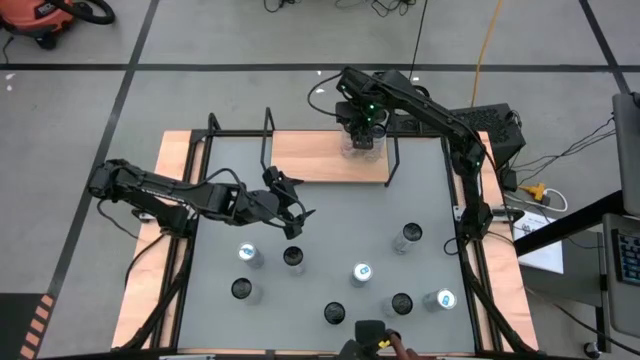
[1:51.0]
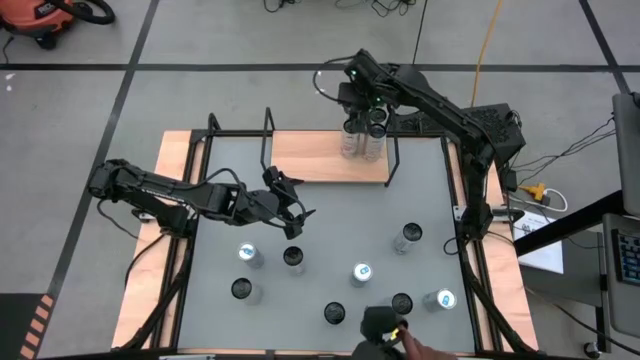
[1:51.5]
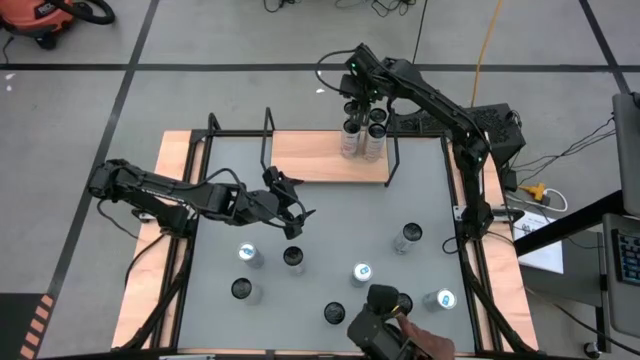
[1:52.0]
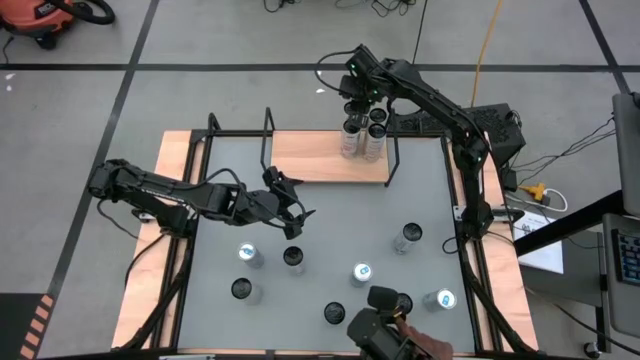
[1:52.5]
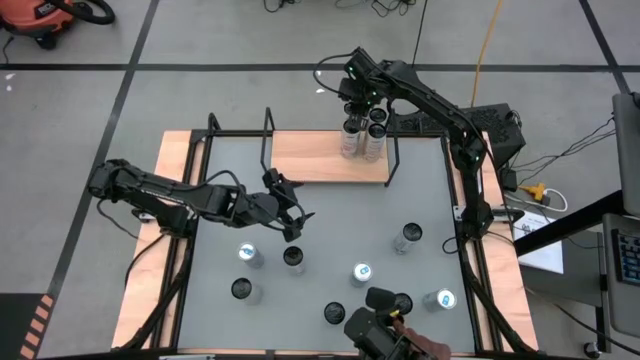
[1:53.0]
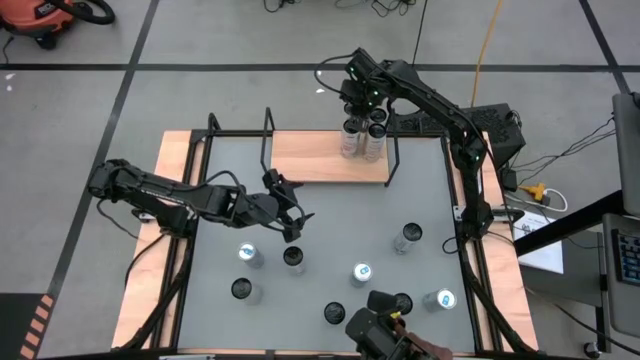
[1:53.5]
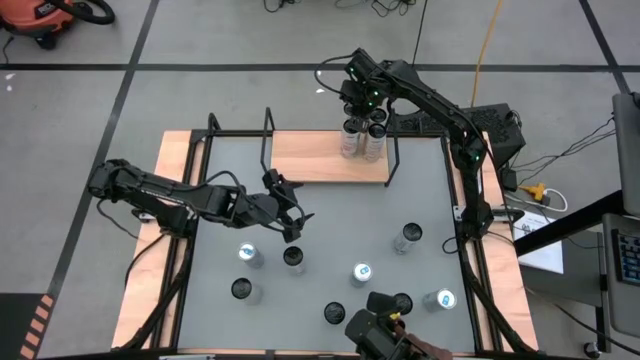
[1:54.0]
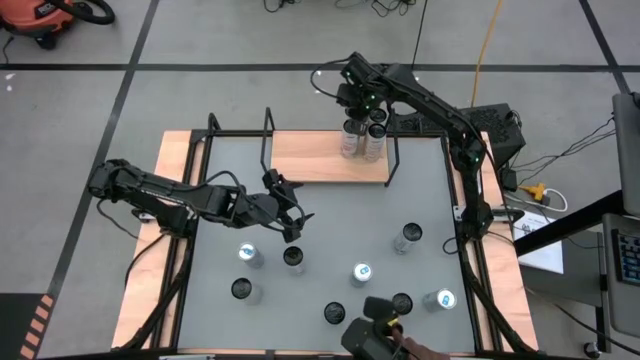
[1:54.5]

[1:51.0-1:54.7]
Task: Place canned beverage on shelf
Adjust the white pink soda can on the shelf

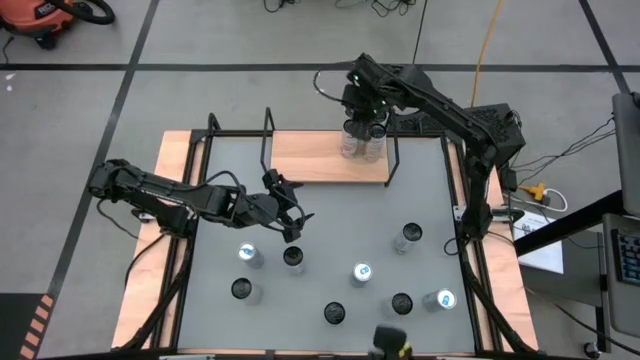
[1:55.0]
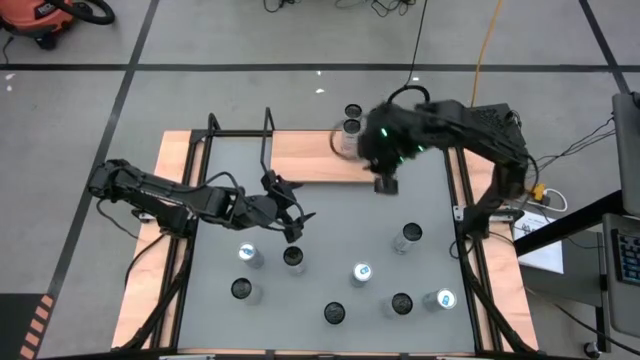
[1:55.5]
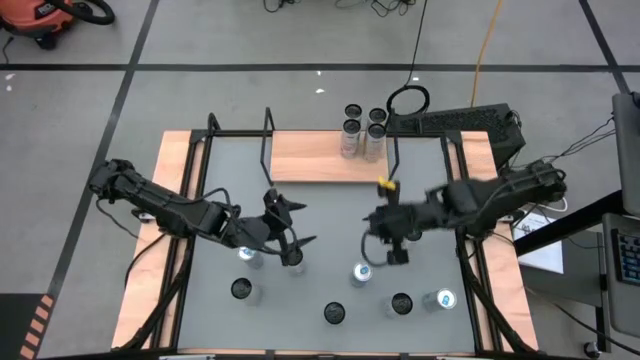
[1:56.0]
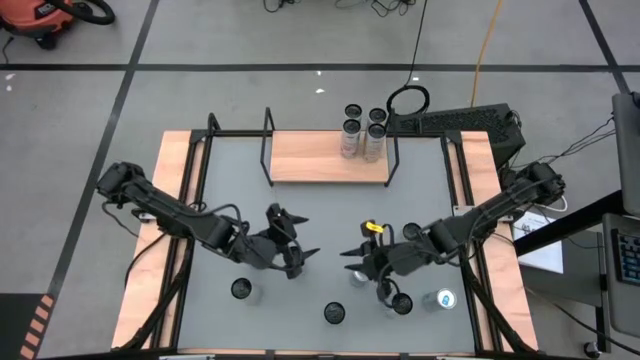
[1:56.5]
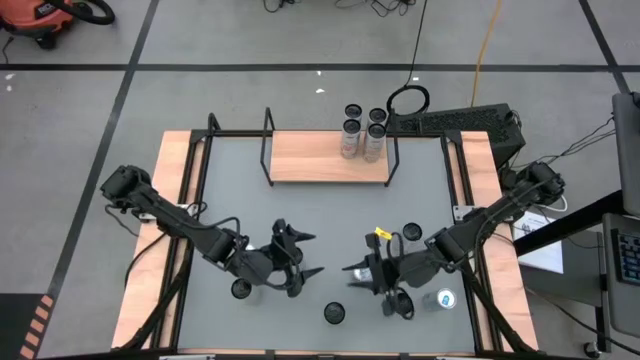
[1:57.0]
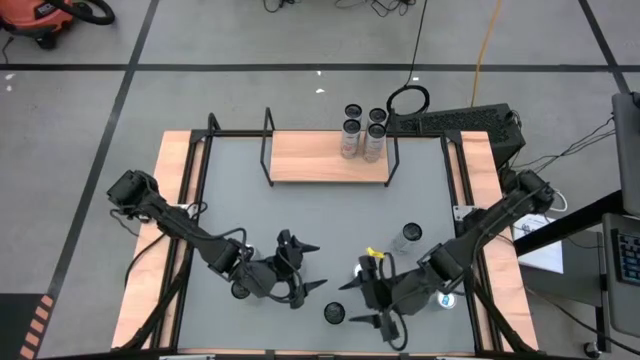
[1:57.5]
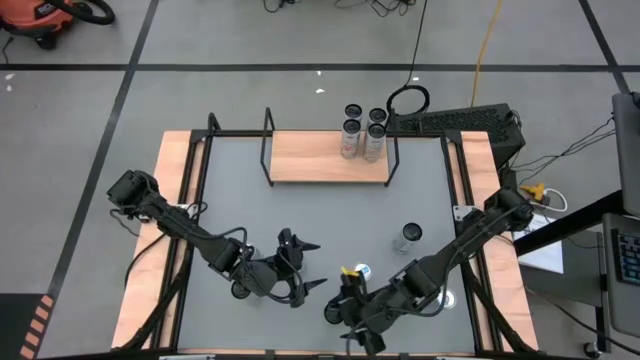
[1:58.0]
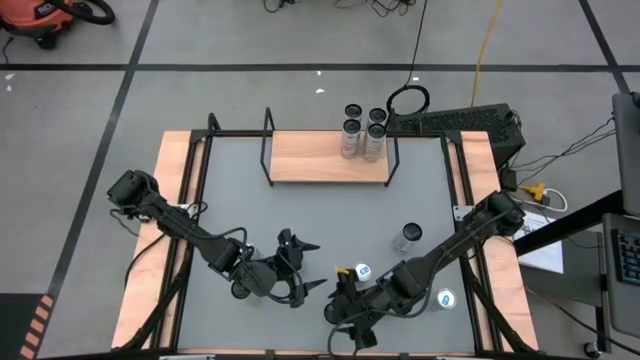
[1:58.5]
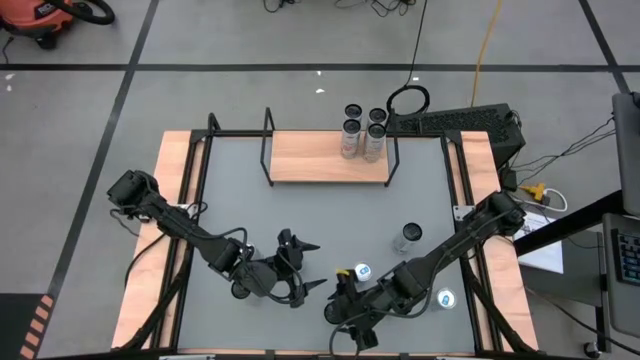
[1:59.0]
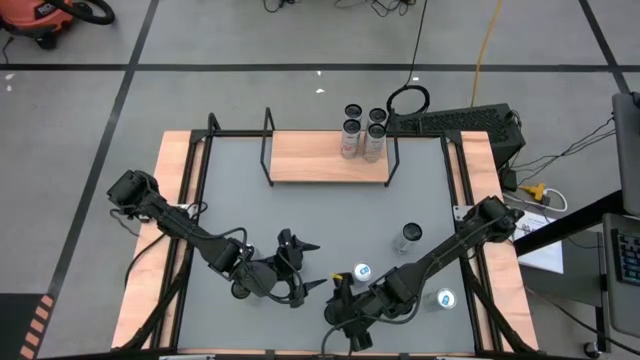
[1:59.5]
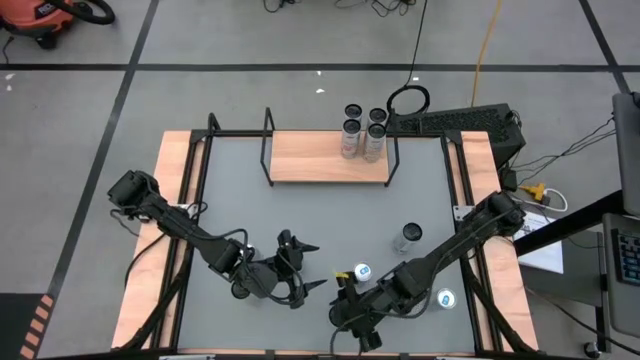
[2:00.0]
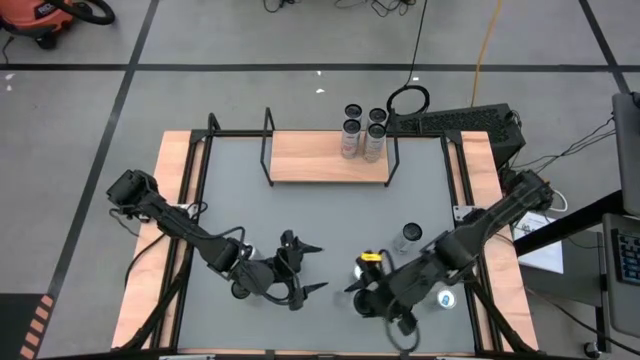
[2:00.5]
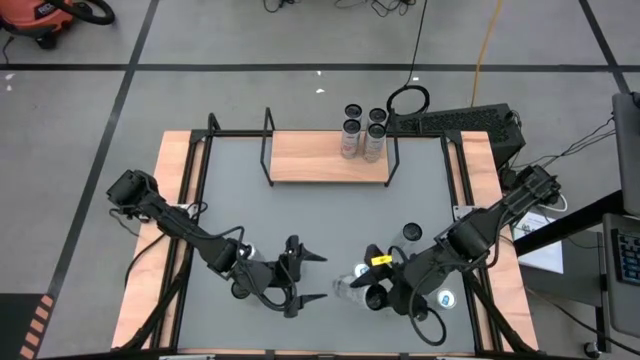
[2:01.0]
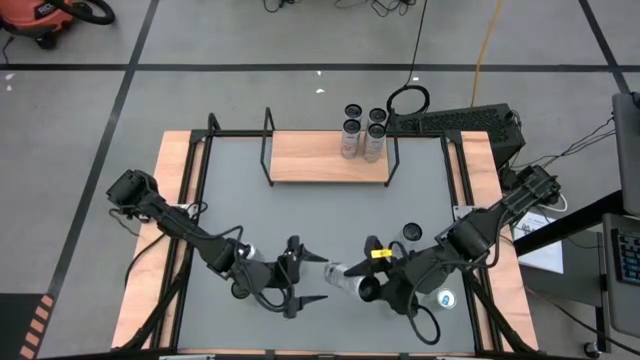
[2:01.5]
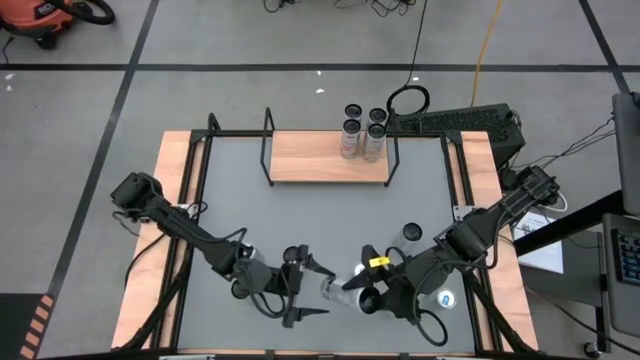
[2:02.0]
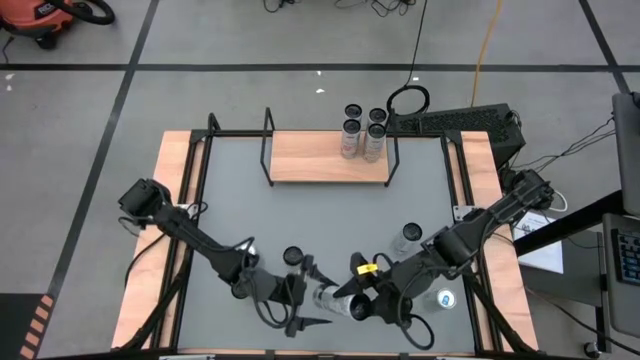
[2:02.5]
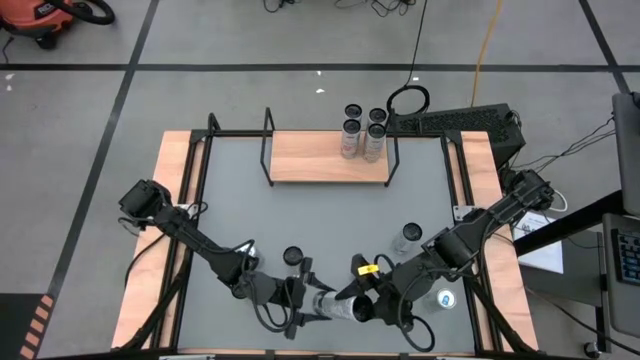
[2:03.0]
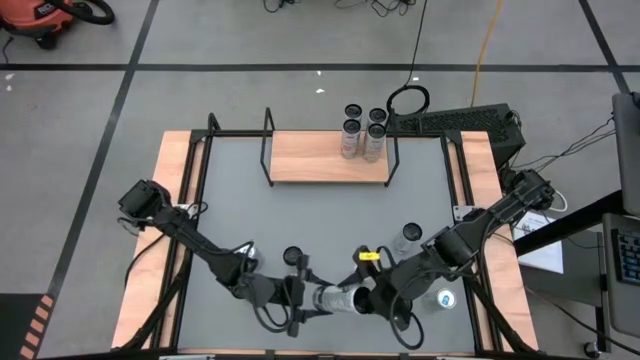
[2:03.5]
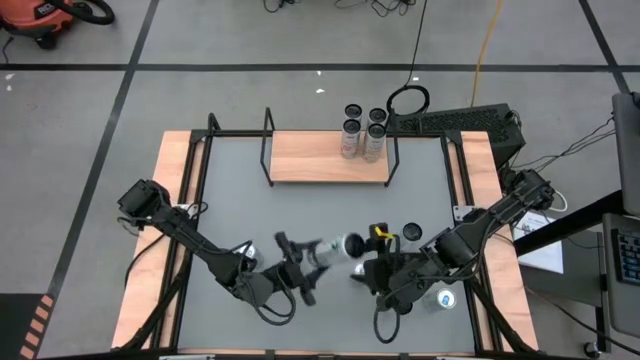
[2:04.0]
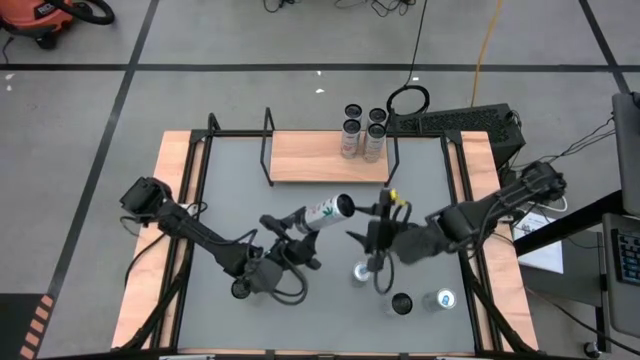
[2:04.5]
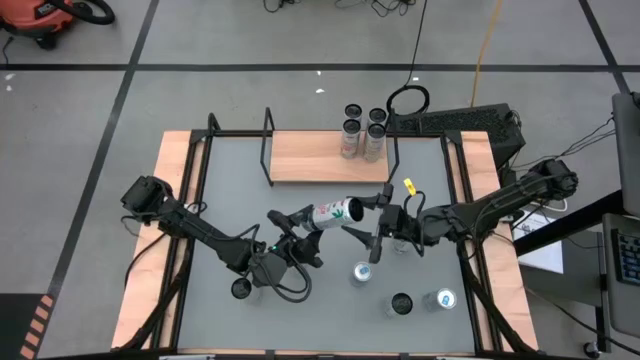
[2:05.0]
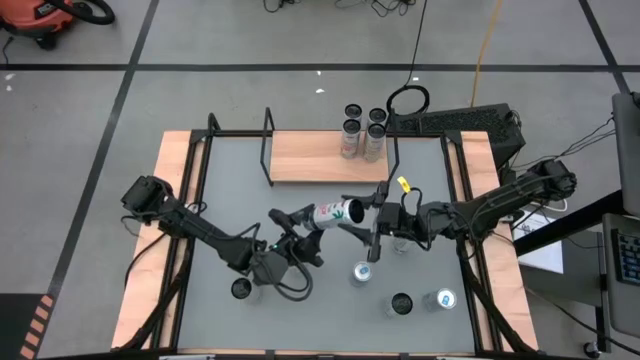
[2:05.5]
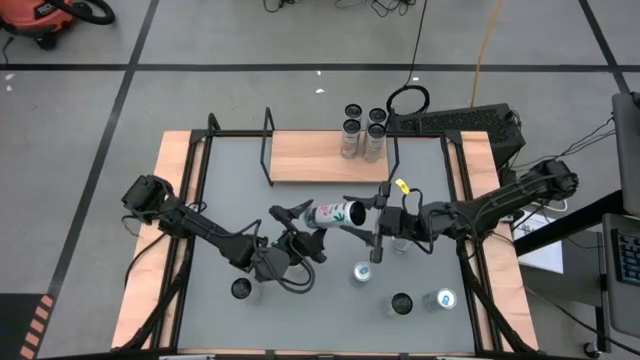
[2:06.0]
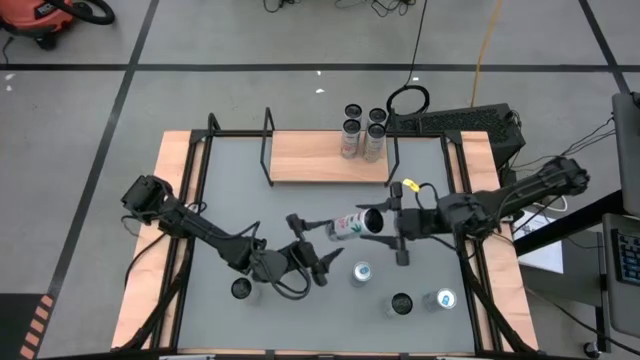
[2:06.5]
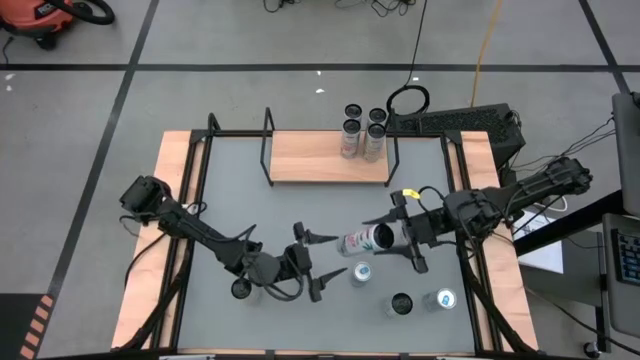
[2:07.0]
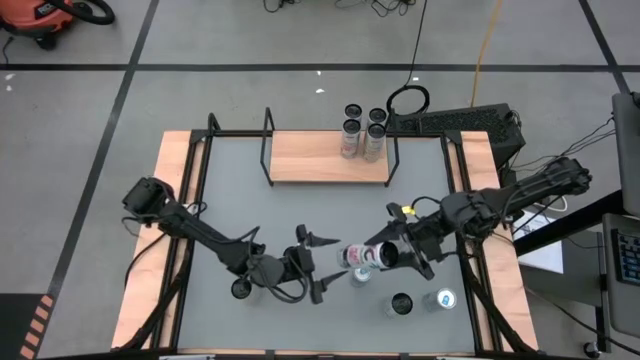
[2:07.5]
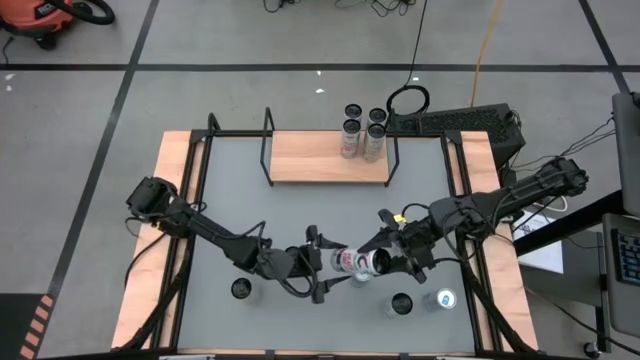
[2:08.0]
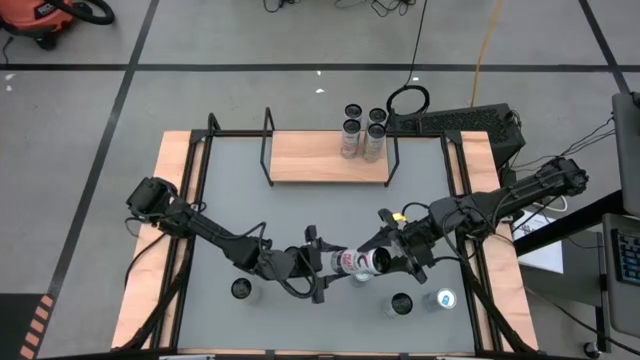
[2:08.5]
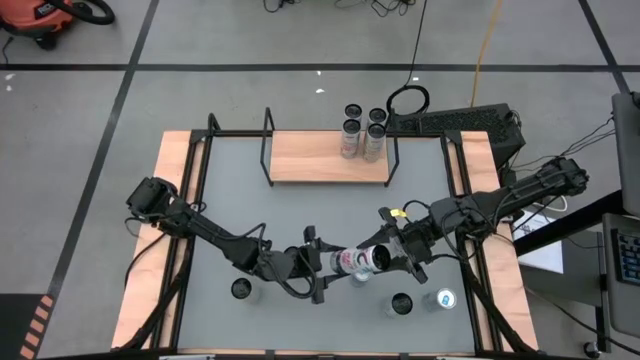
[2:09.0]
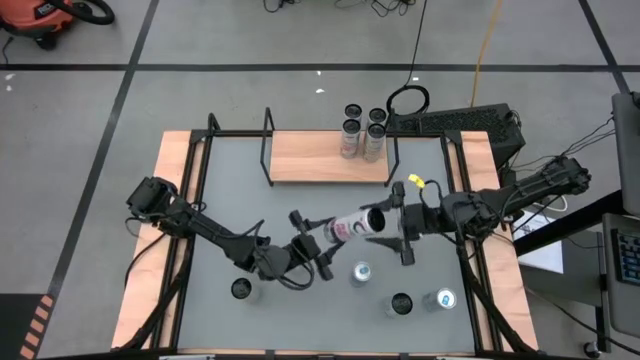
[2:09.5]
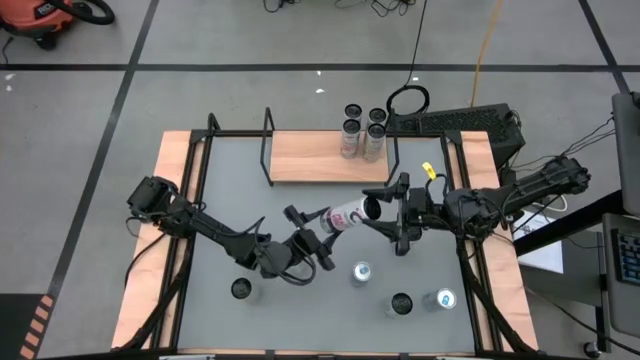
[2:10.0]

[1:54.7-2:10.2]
Put the white pink soda can on the shelf aligned with the white pink soda cans

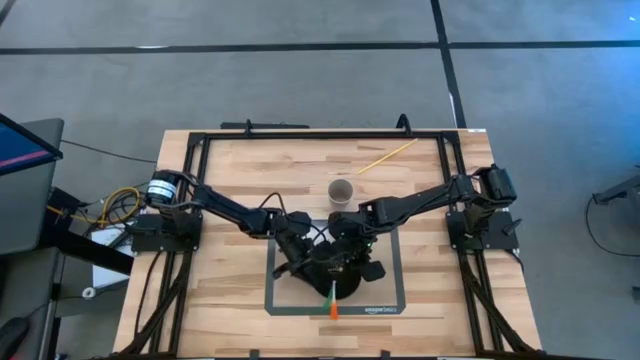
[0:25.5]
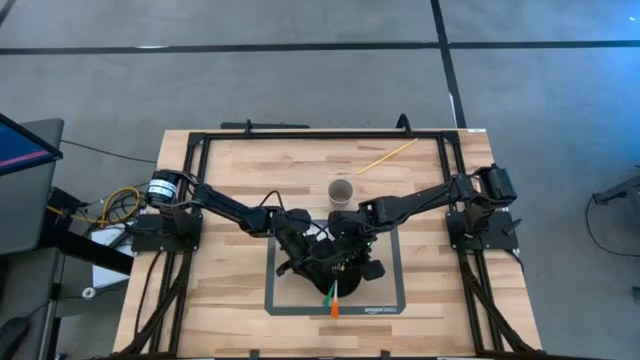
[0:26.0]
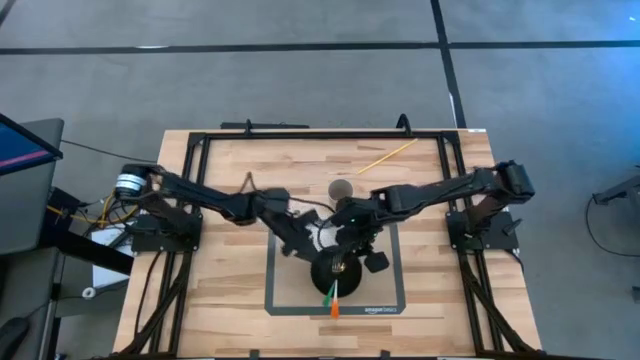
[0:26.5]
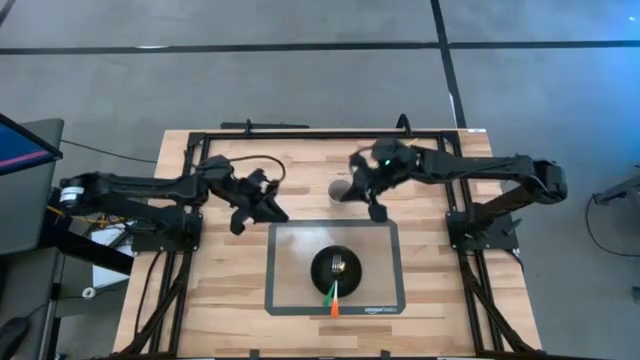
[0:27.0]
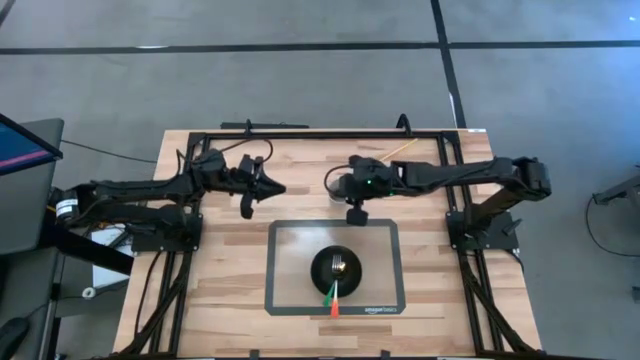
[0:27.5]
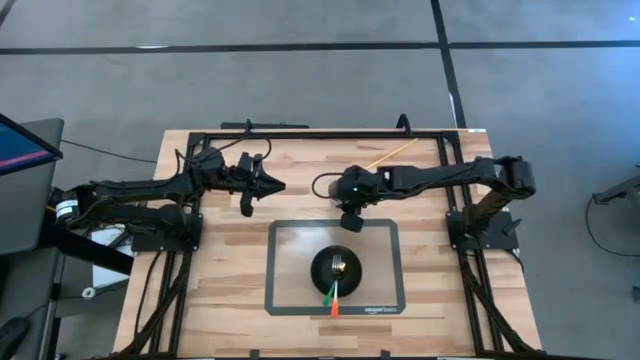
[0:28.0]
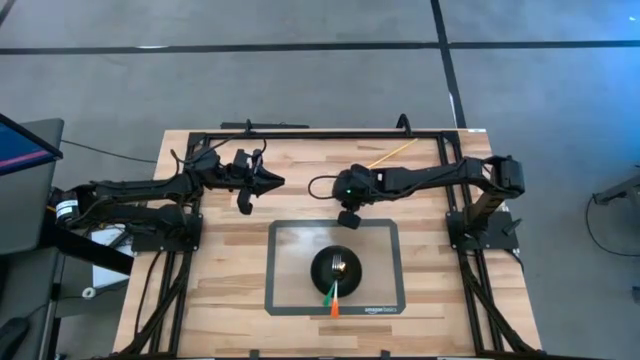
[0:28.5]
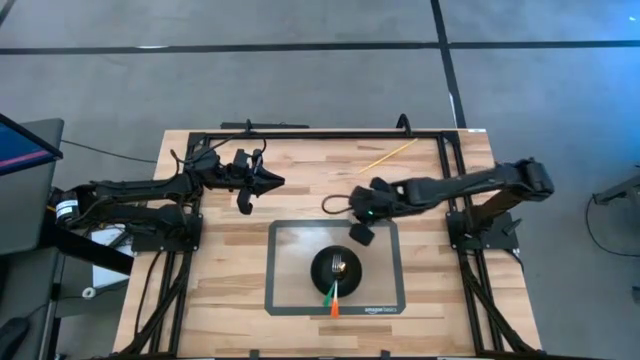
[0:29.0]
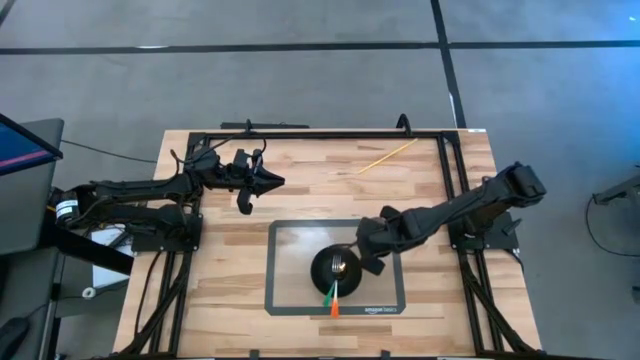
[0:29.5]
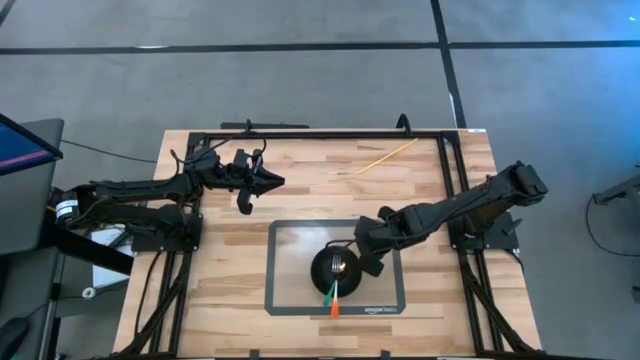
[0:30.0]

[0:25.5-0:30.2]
Task: Pick & Place Utensil
Put the white cup to the top right of the black bowl on the transparent mat
